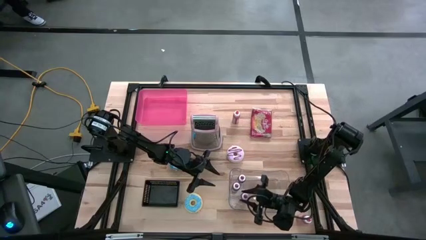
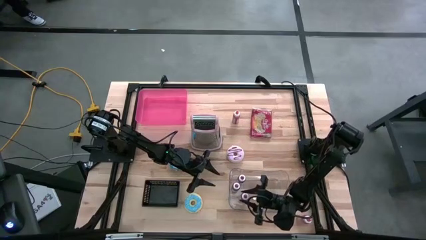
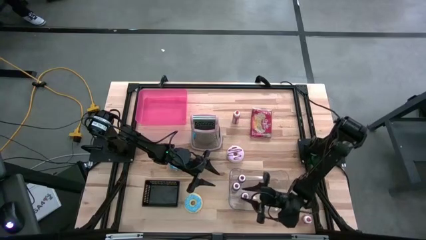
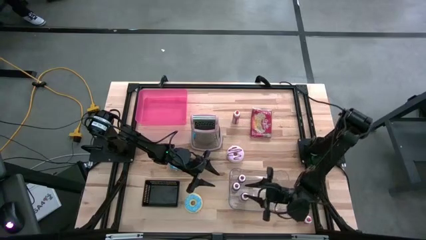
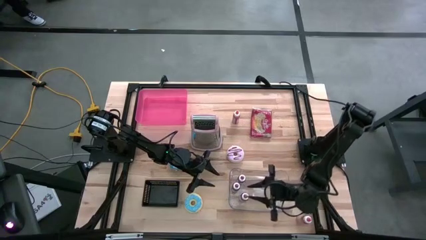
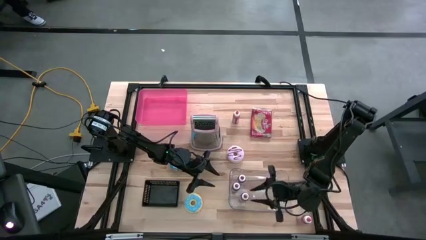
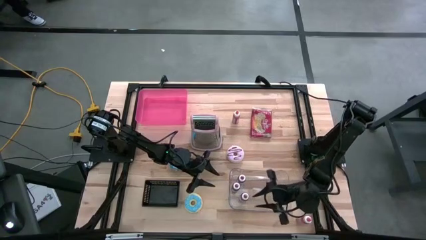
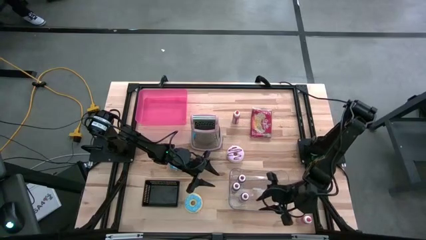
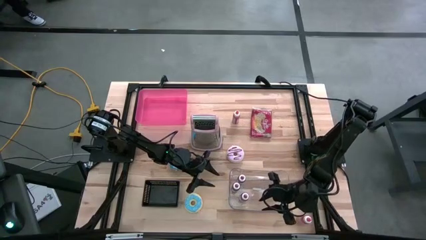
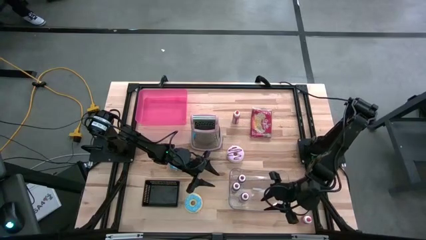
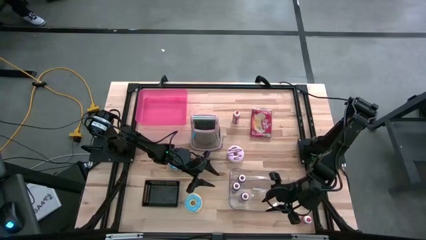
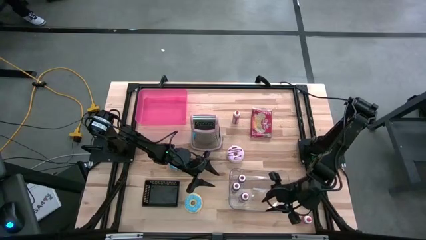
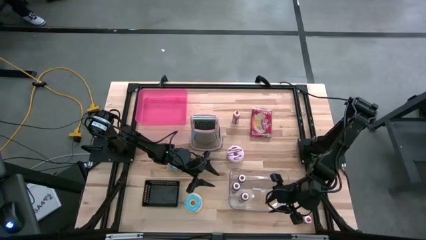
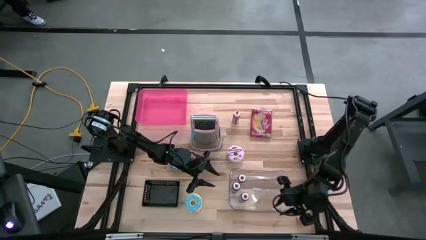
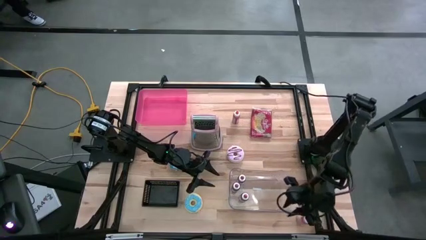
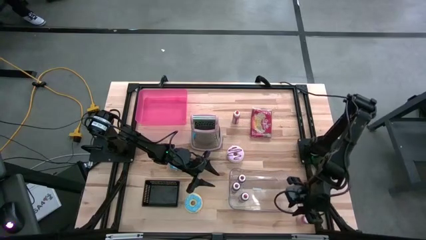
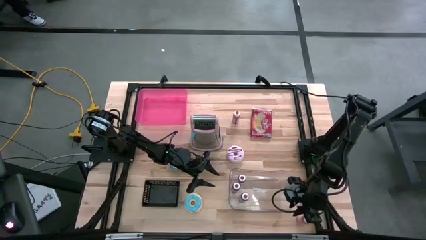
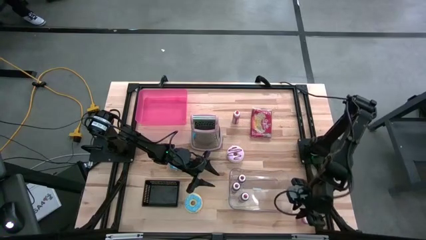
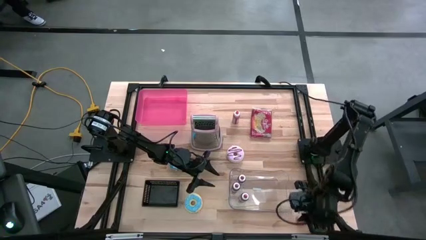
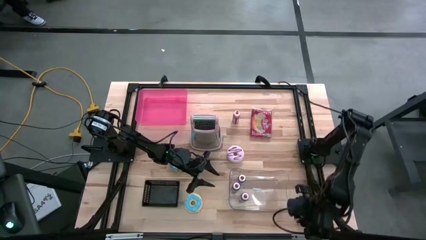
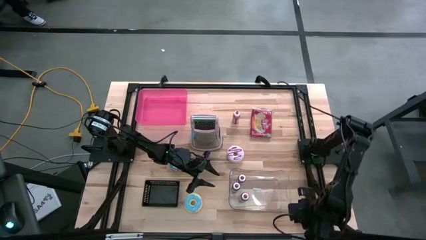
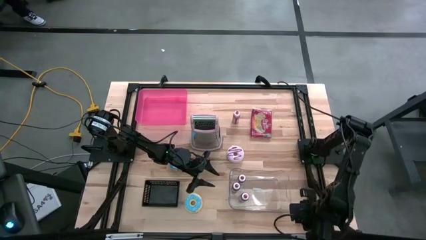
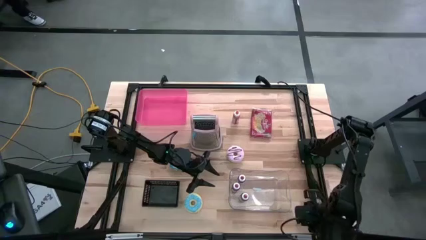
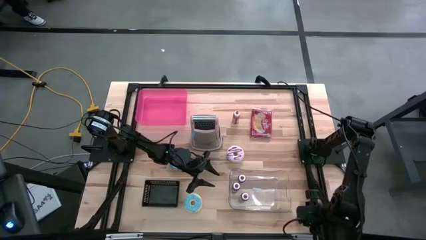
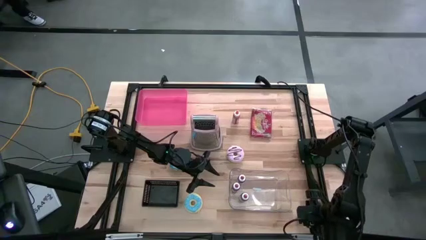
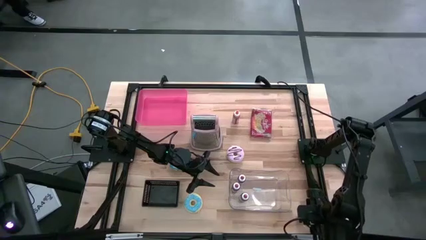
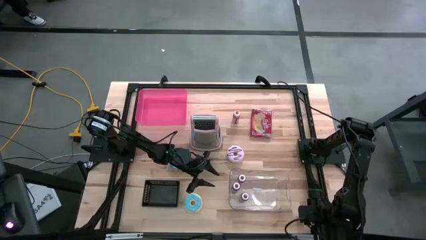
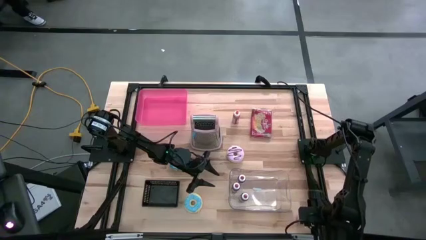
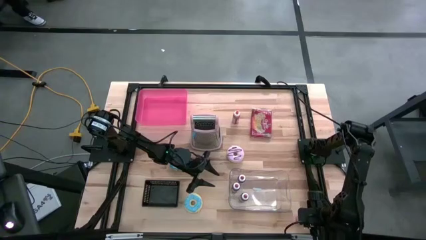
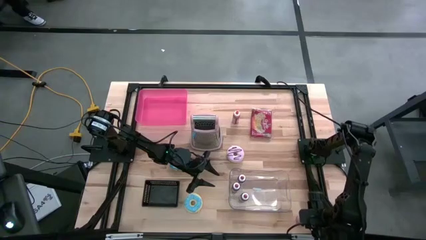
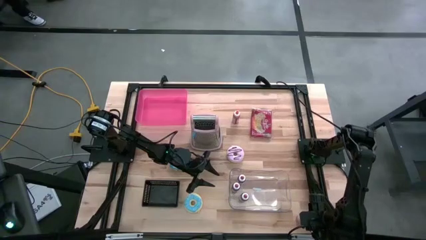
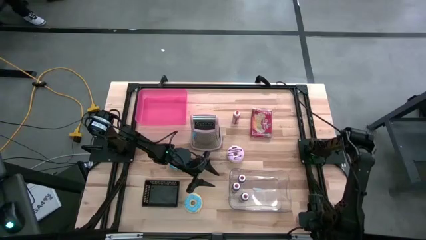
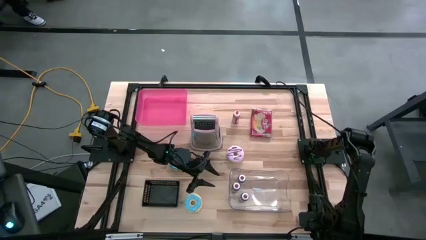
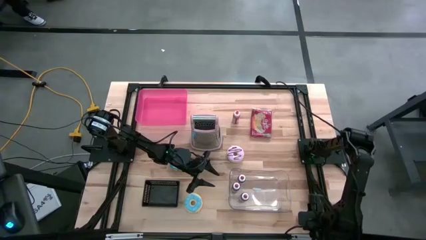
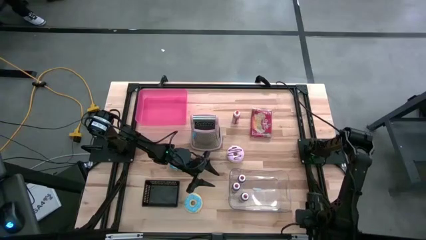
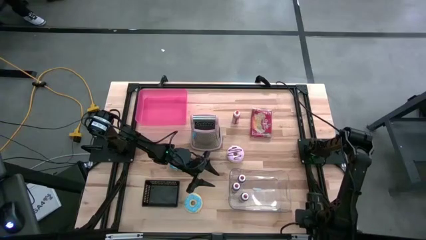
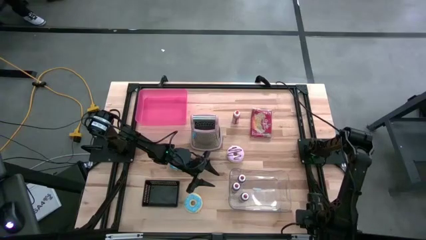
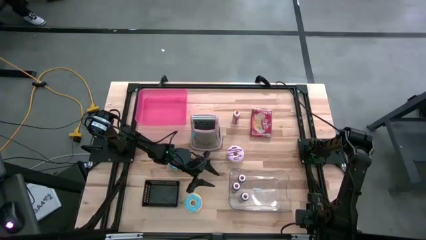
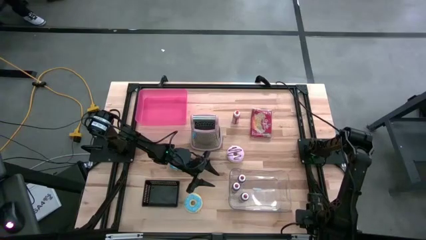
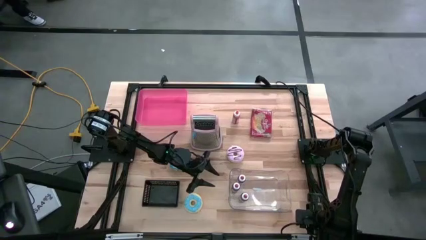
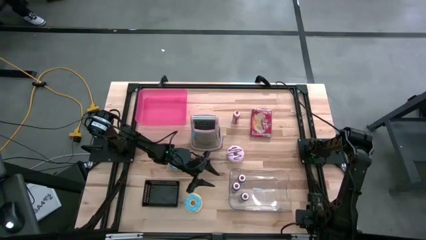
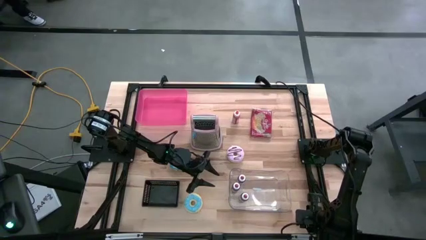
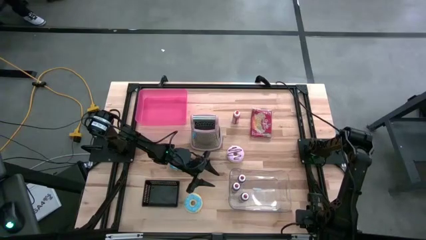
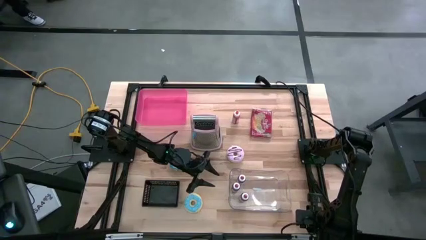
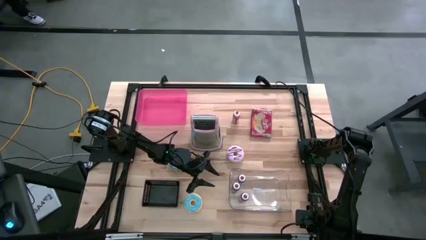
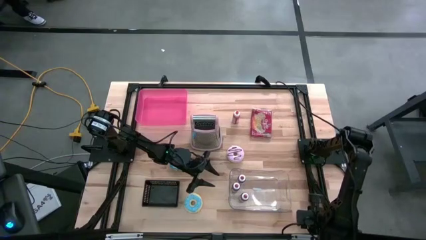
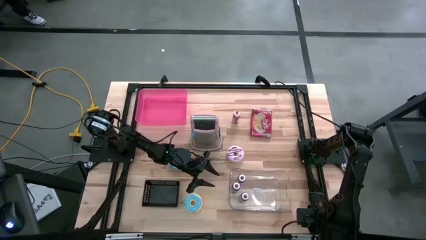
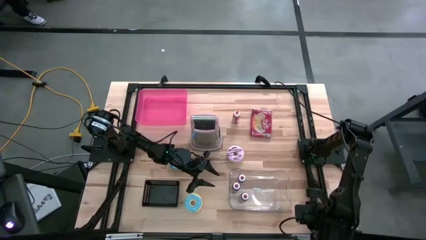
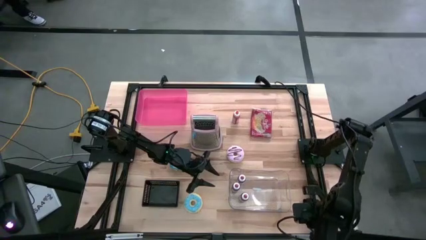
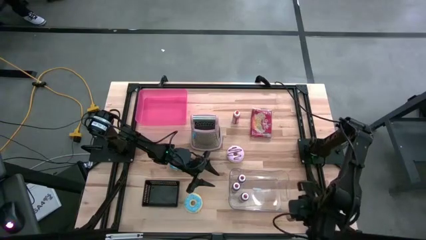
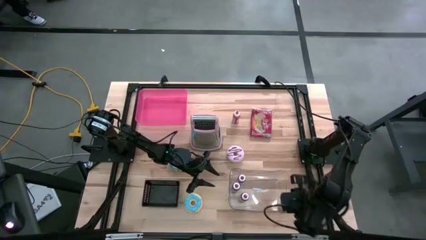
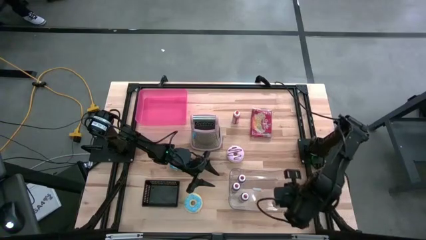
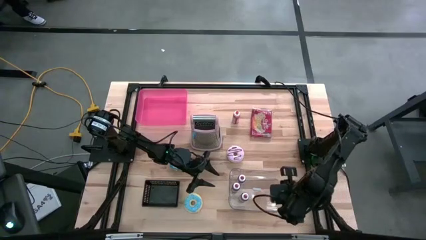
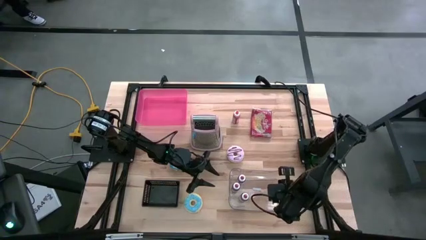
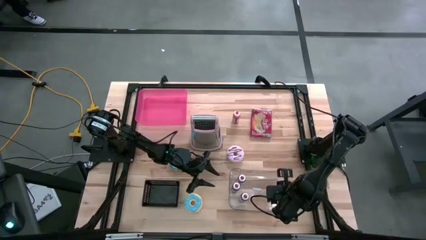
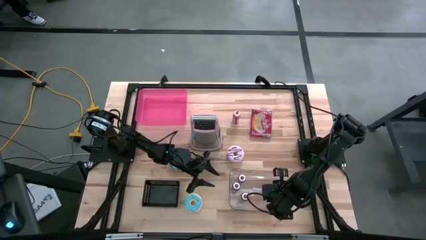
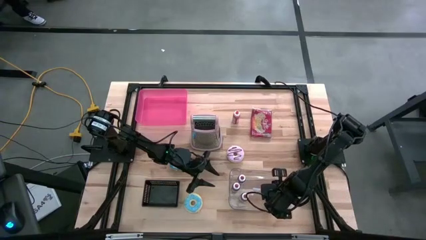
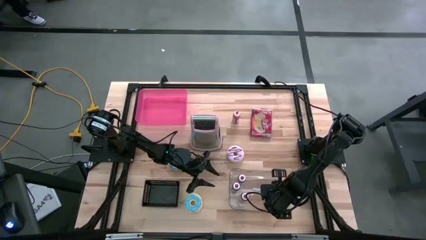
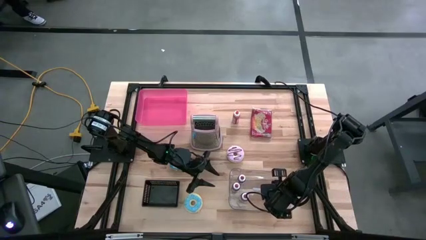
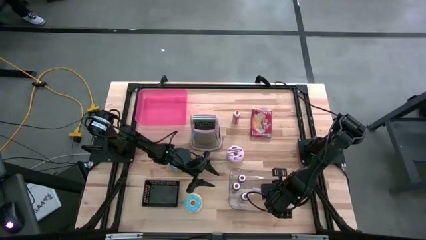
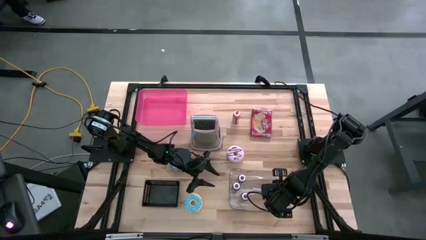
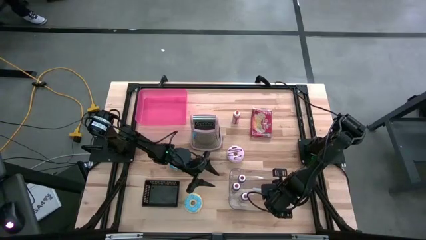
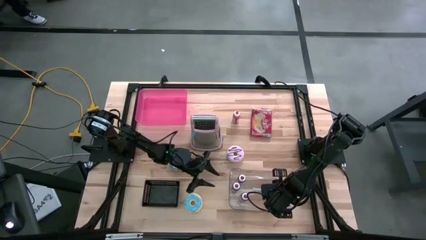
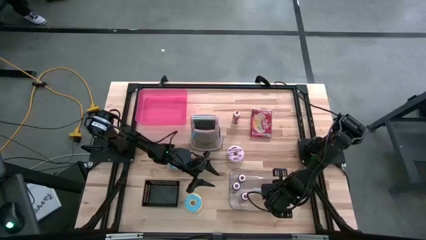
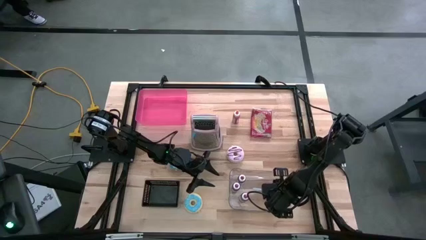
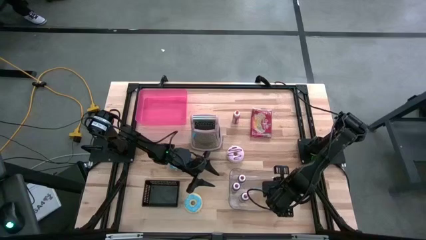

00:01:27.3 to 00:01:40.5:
Task: Pick & Place Food Item
Put the bottom orange food coloring bottle into the transparent bin

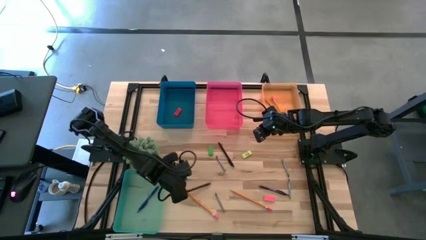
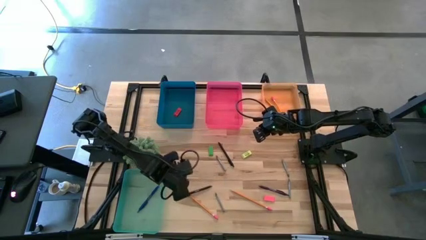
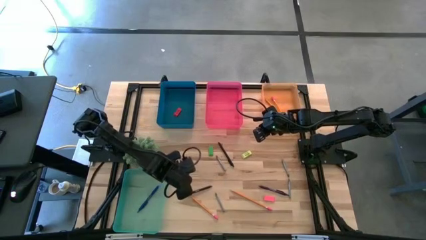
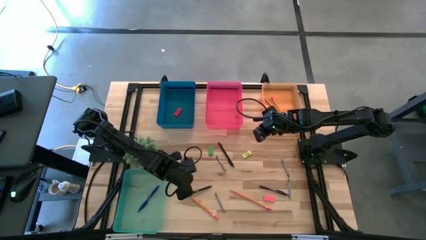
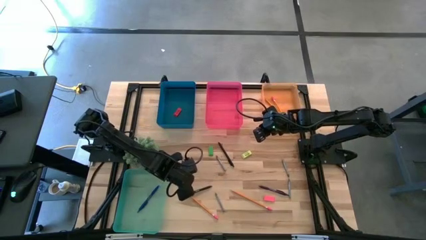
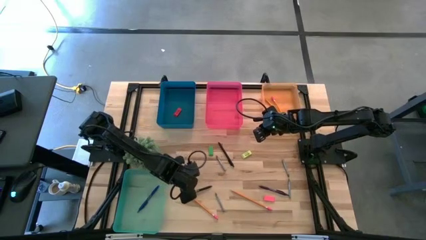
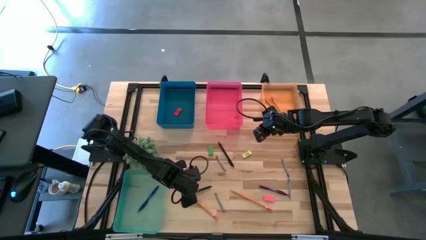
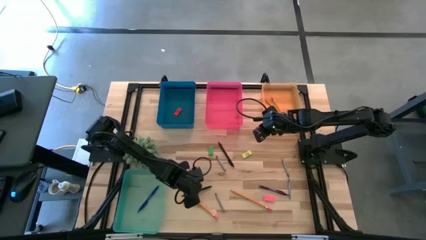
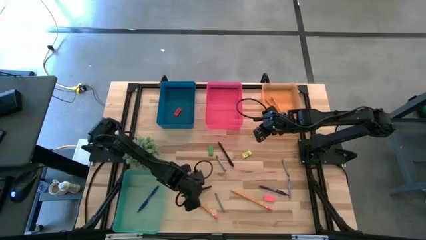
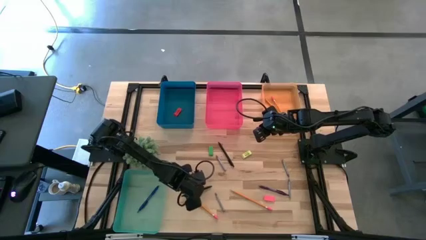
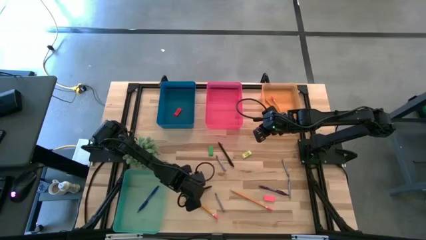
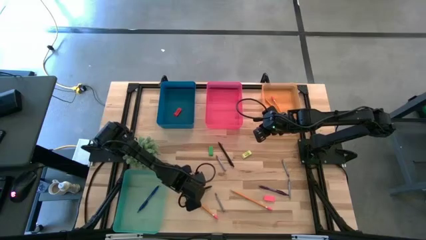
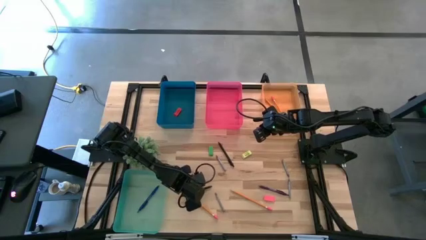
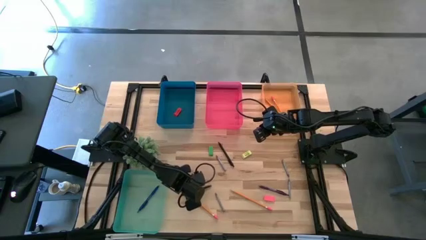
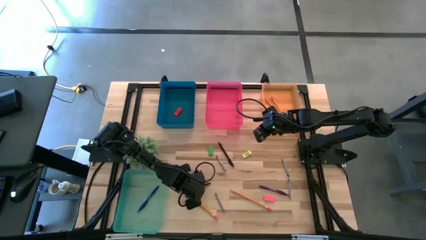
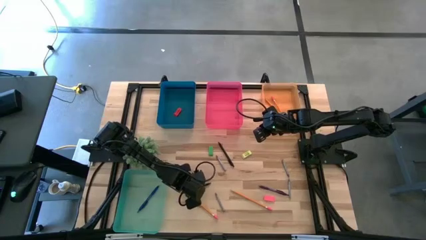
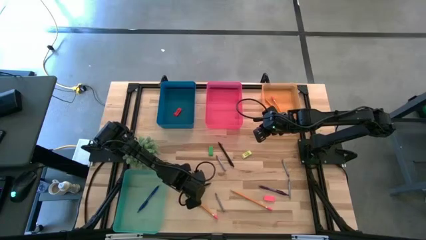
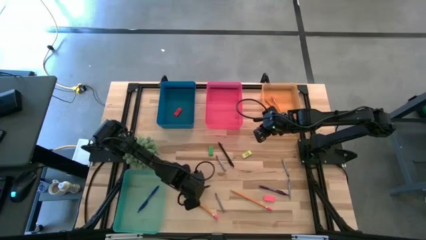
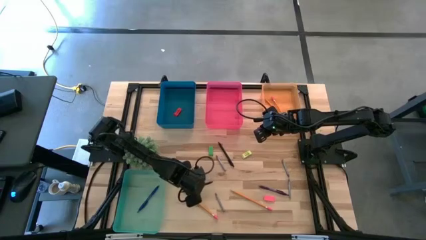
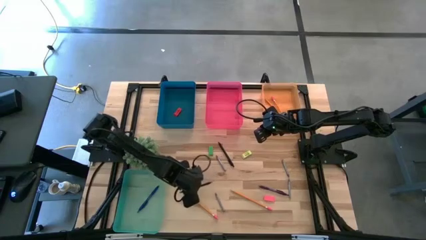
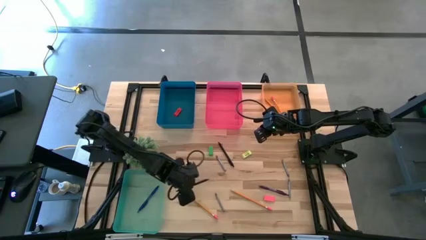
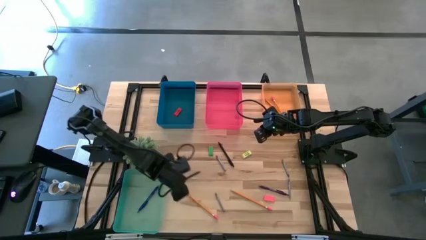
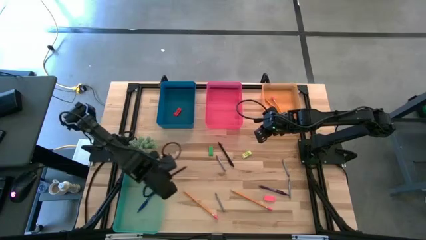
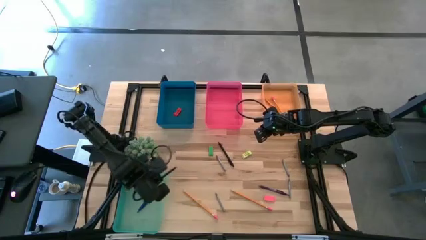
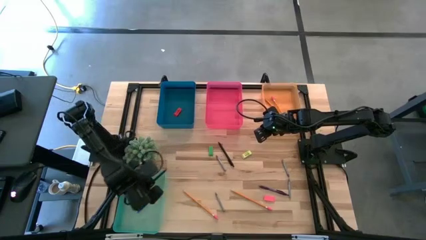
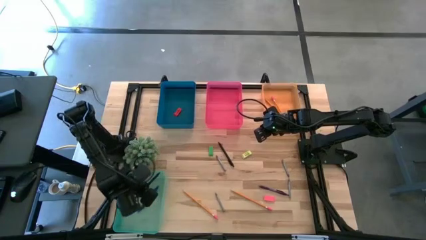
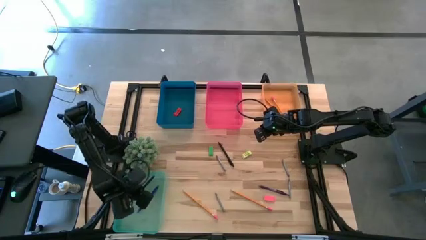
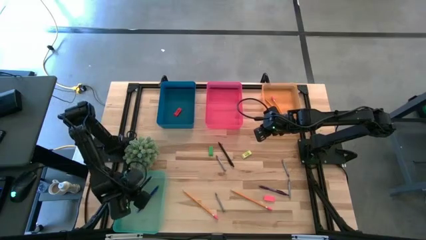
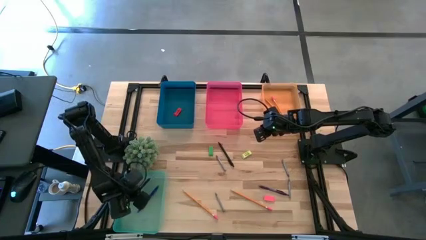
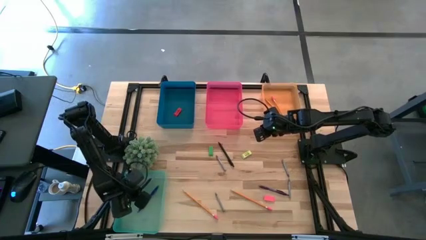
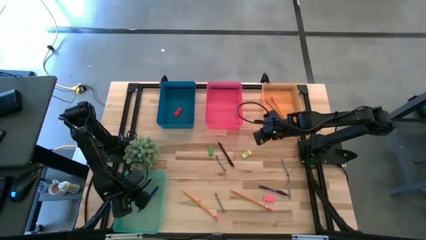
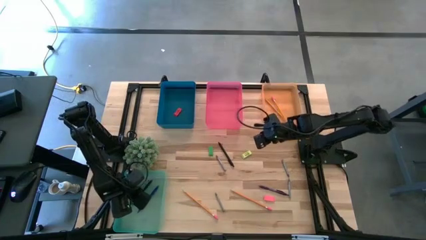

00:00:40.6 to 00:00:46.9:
Task: Sort crayons/erasers/pens/pencils in bins
Put the left black pen into the transparent blue bin
